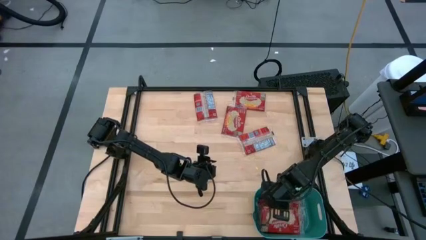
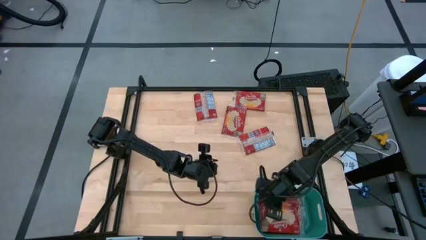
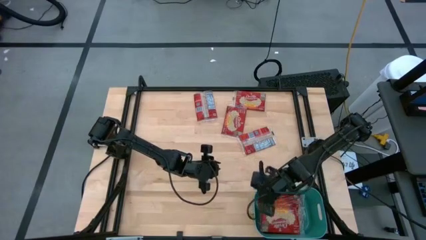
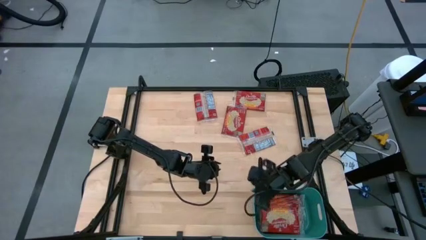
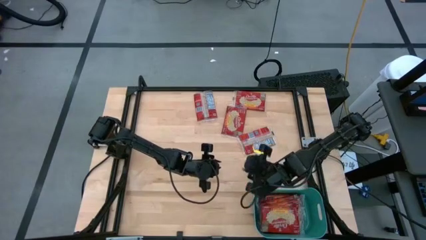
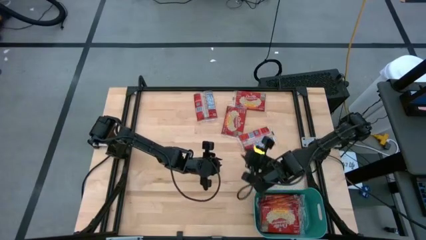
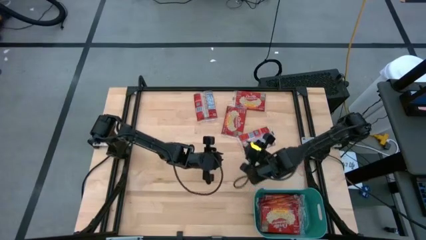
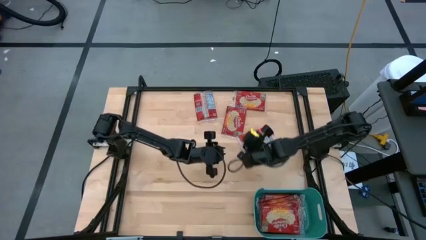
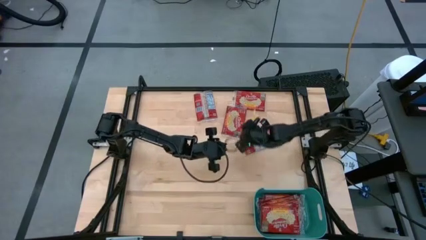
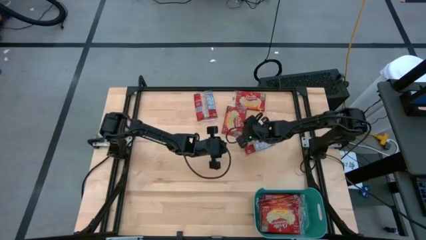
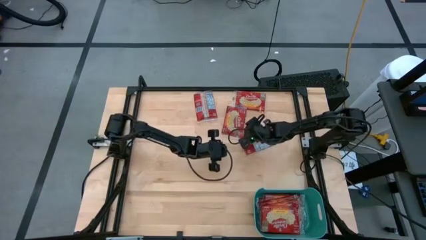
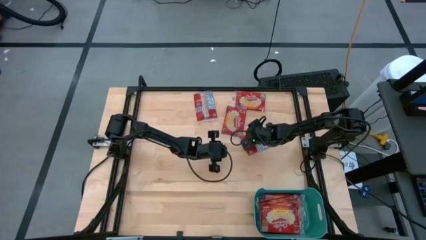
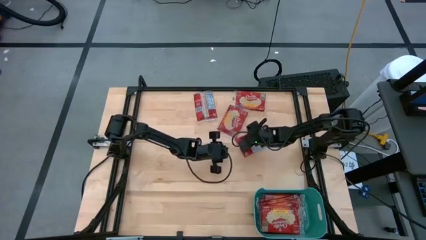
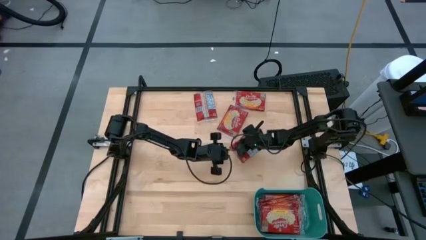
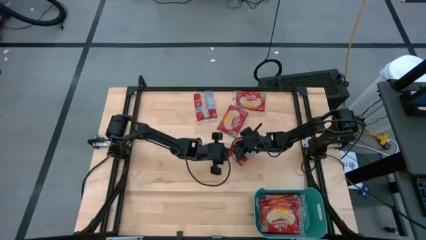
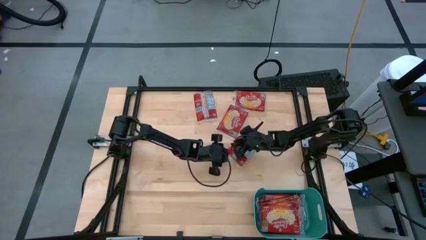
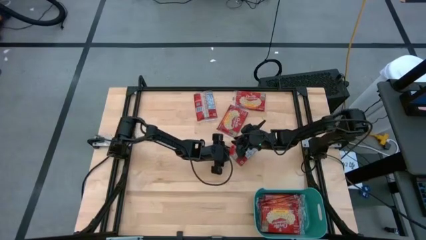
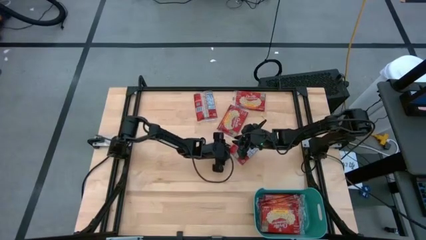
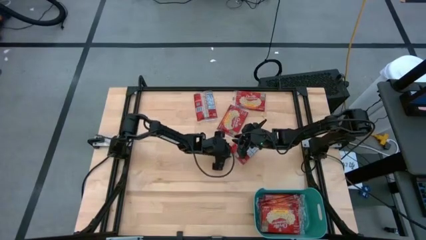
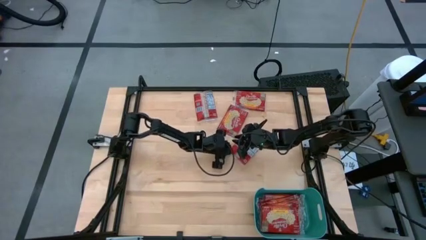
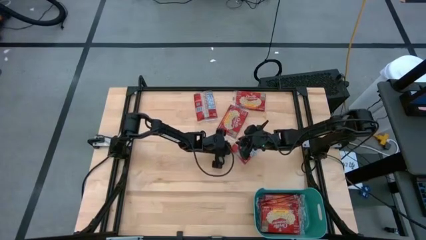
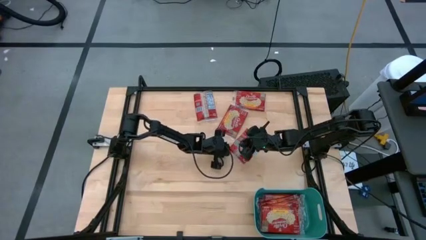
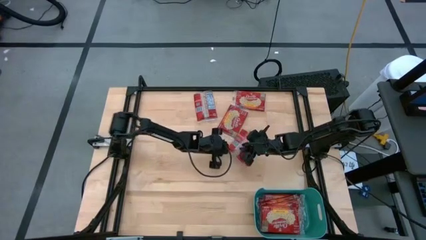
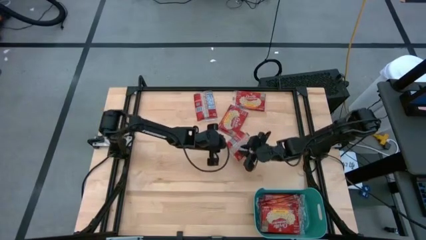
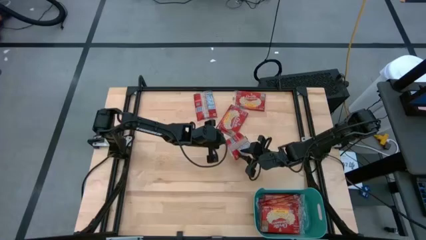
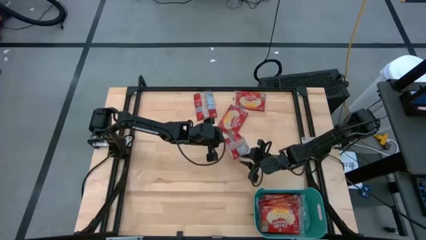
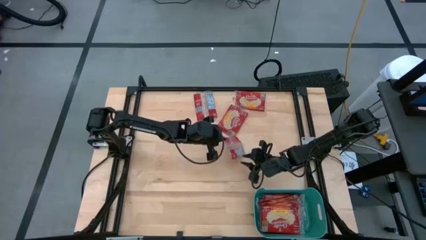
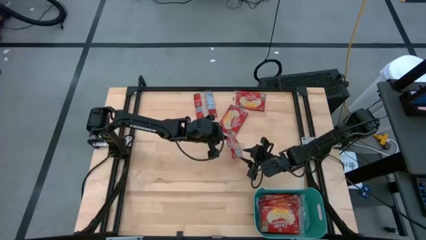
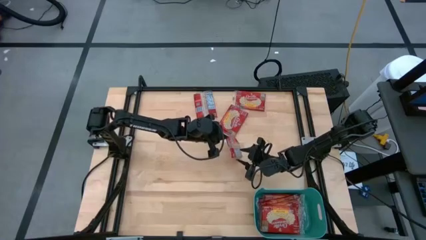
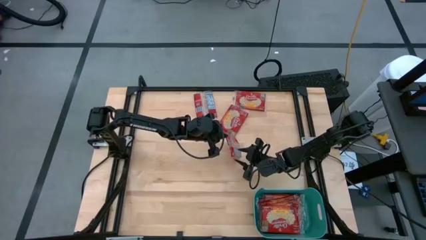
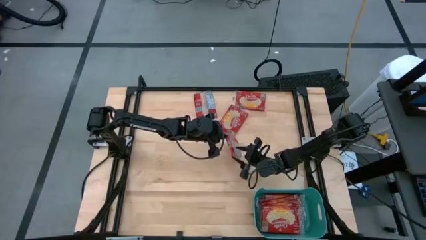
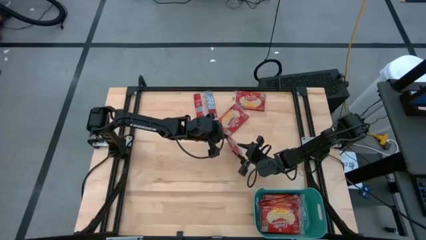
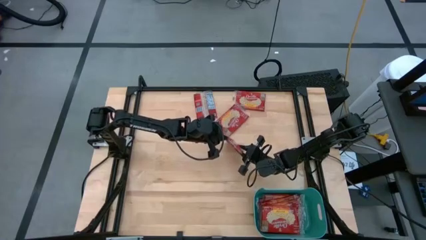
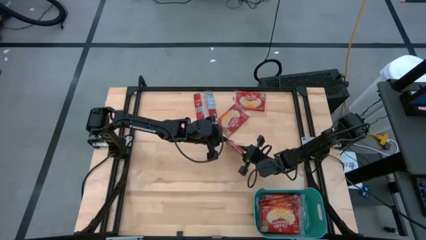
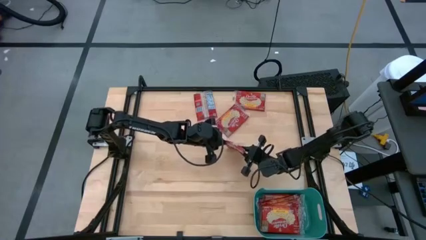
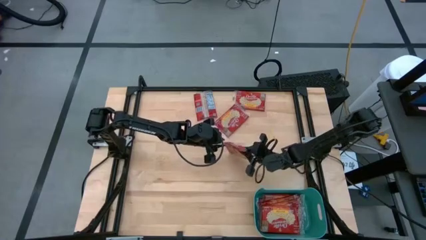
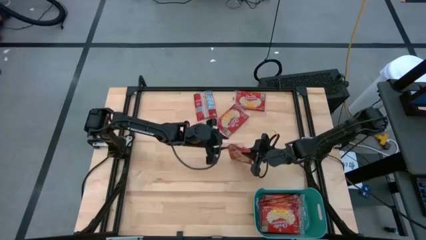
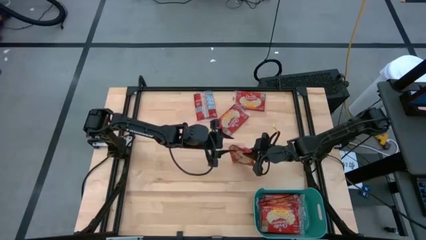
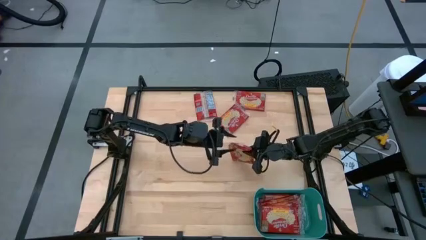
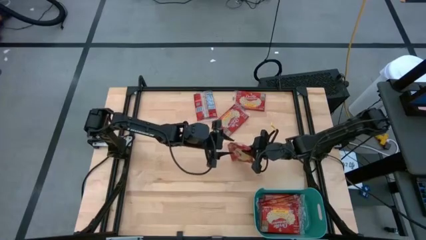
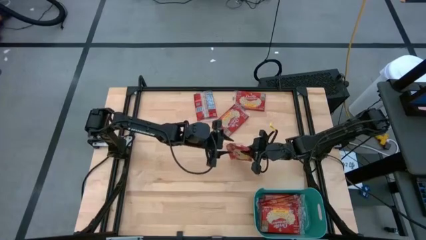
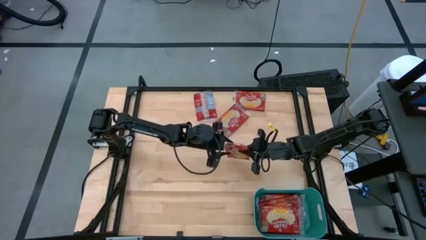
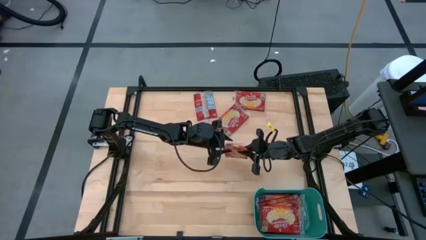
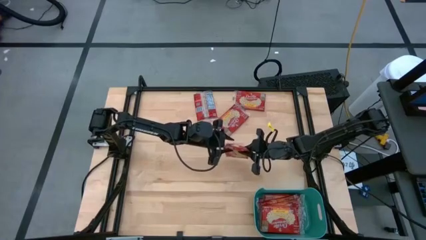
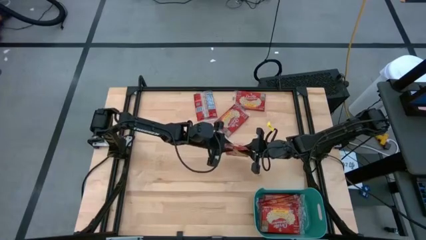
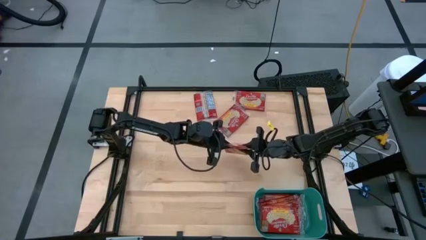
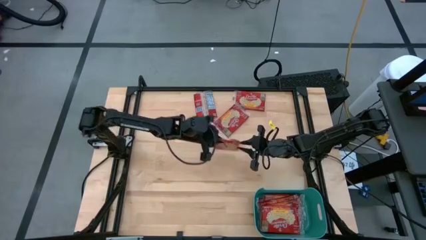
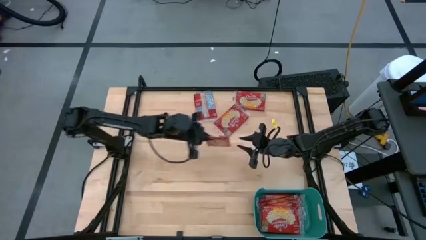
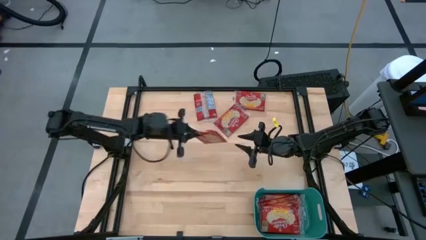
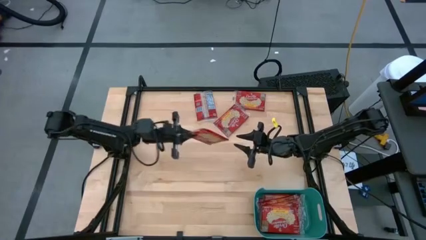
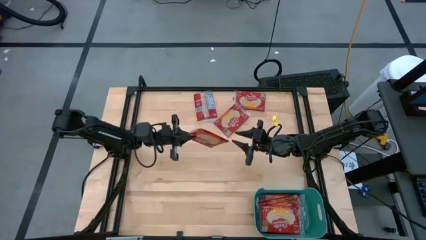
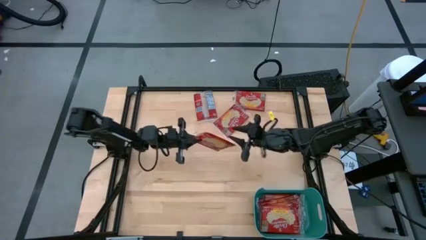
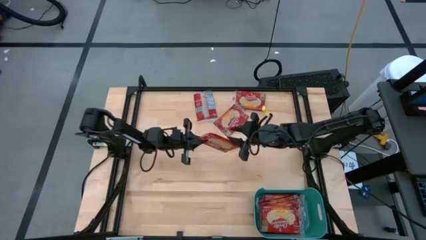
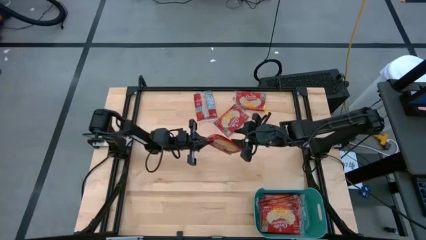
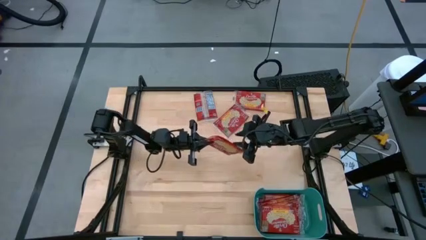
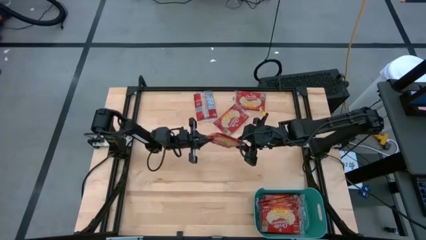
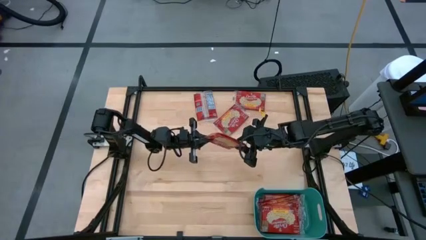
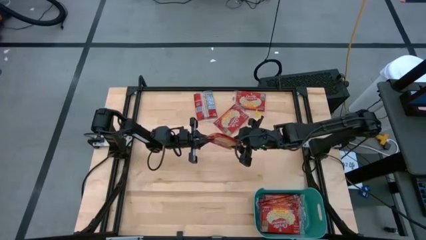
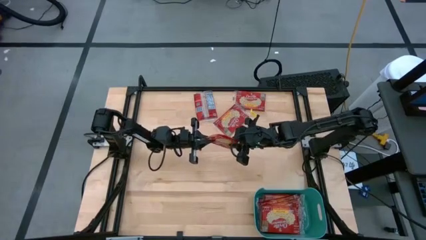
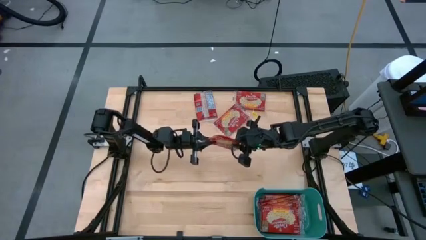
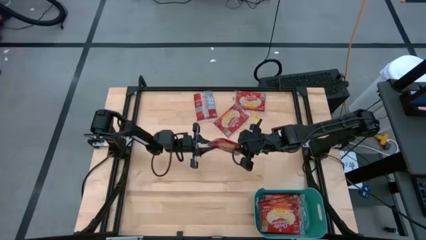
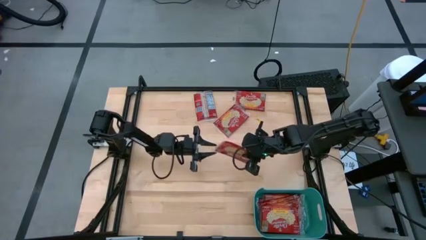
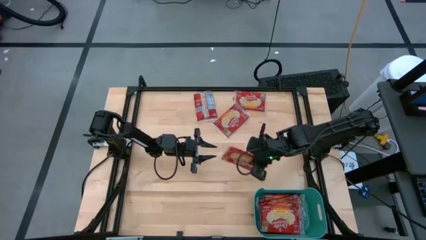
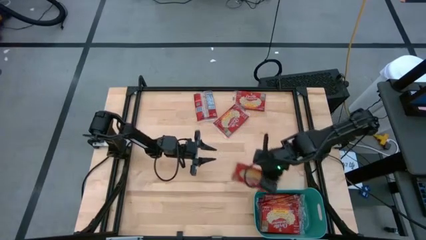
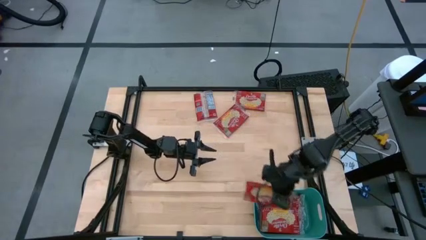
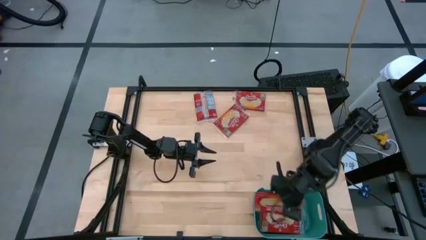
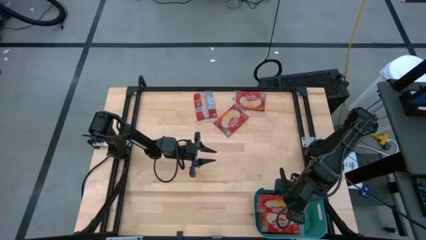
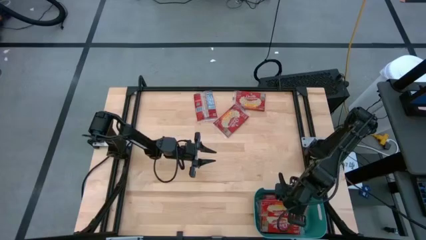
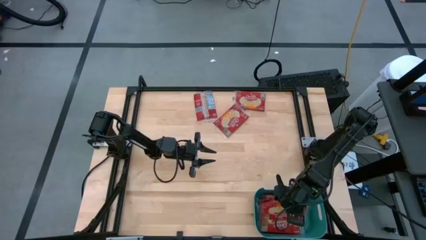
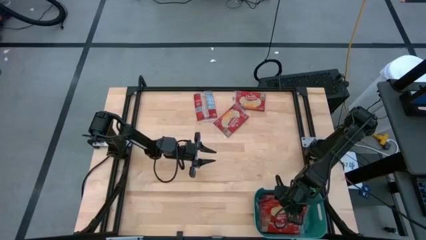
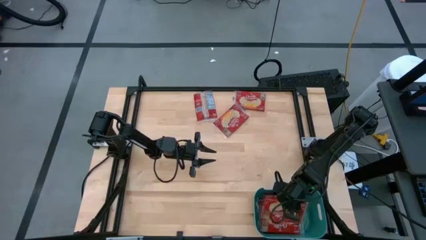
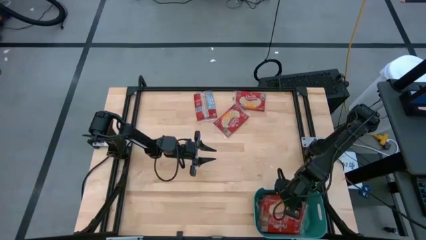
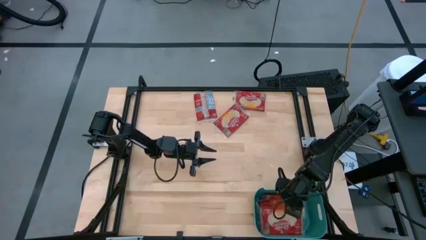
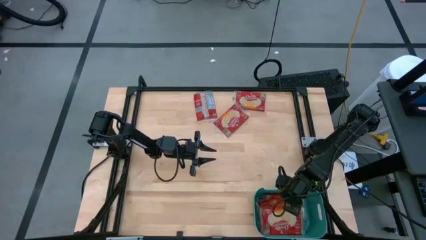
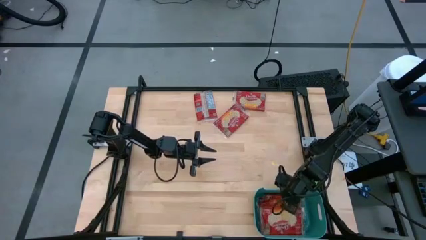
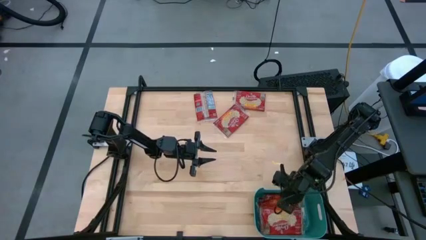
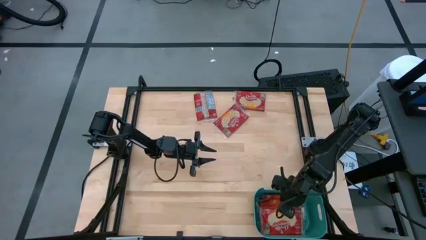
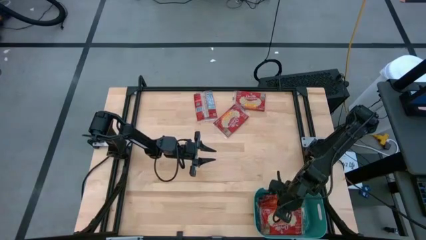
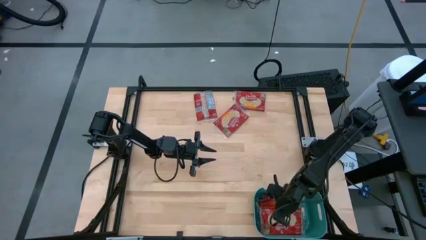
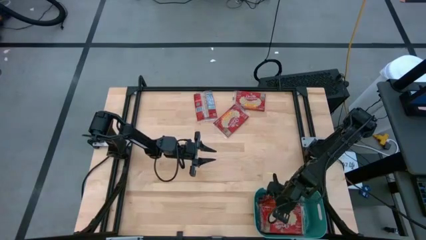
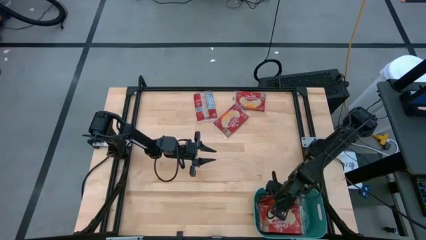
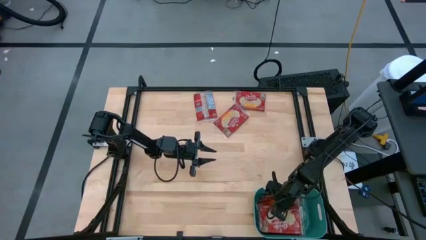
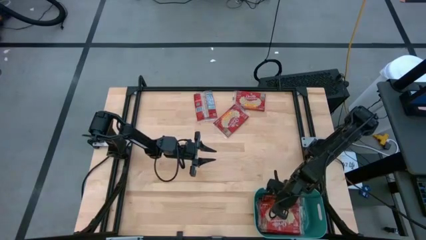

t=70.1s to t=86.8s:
Task: Sort popcorn bags into baskets
Put the popcorn bag into the green bin
